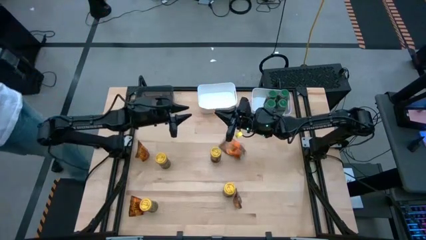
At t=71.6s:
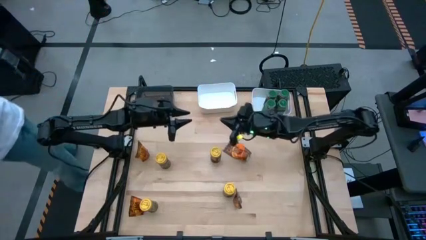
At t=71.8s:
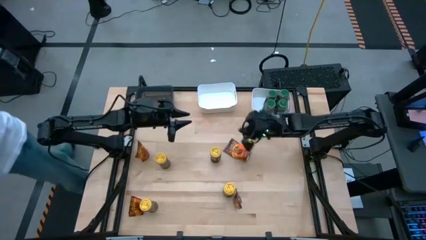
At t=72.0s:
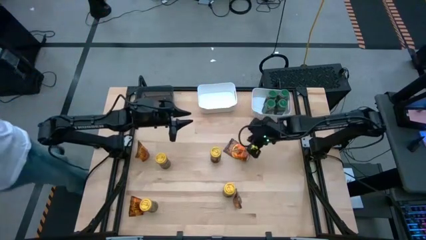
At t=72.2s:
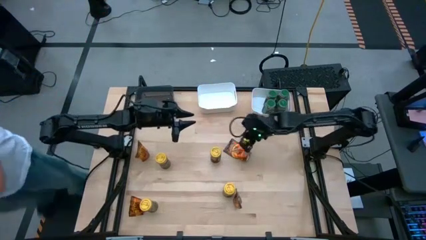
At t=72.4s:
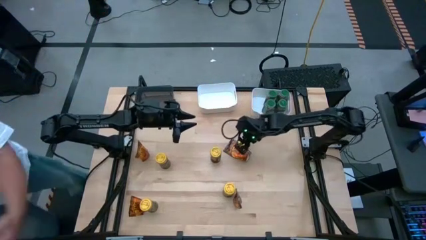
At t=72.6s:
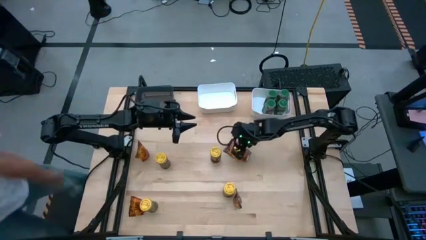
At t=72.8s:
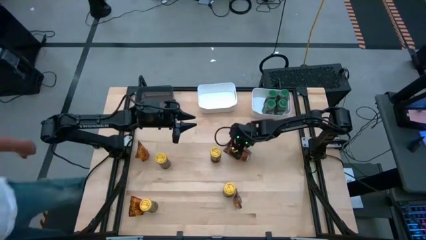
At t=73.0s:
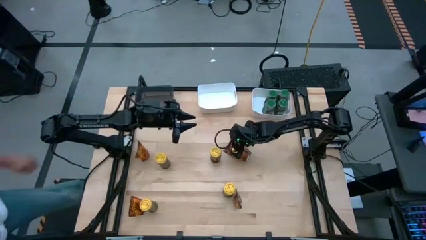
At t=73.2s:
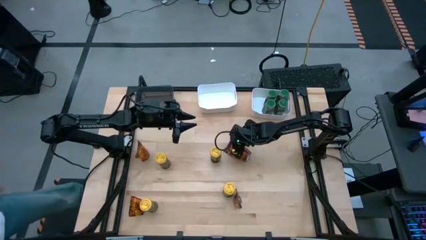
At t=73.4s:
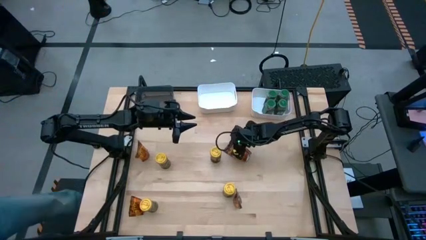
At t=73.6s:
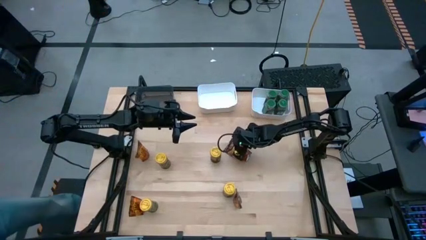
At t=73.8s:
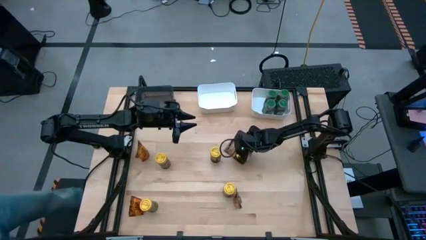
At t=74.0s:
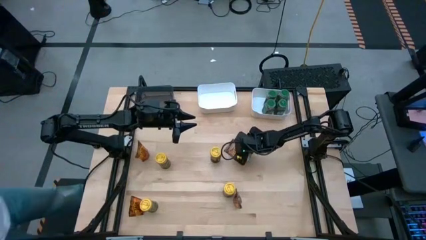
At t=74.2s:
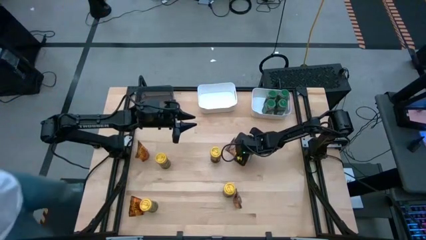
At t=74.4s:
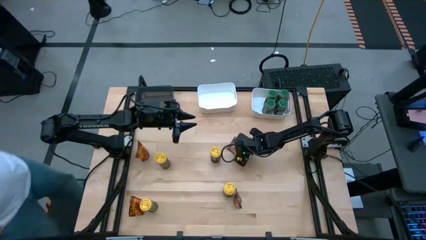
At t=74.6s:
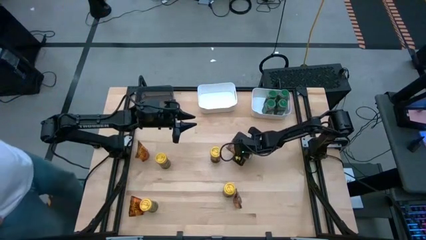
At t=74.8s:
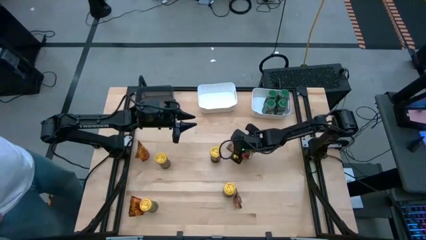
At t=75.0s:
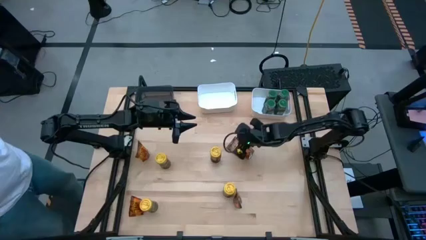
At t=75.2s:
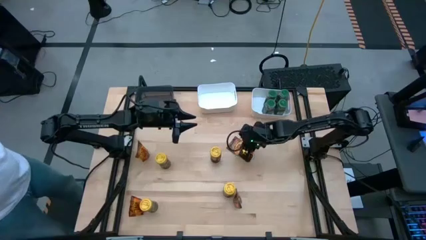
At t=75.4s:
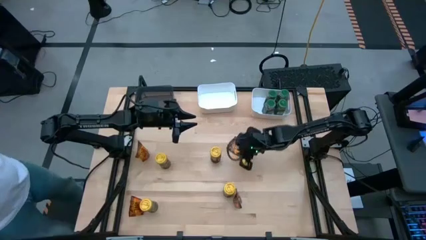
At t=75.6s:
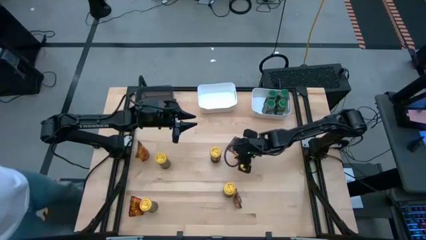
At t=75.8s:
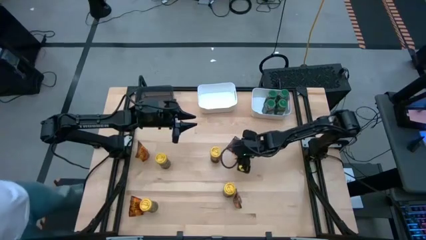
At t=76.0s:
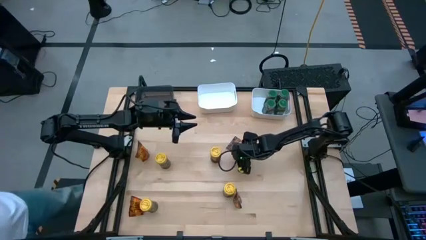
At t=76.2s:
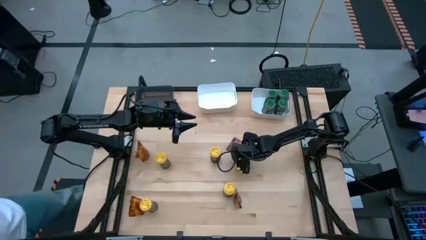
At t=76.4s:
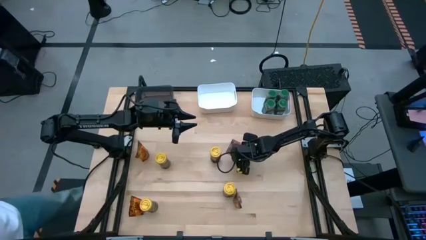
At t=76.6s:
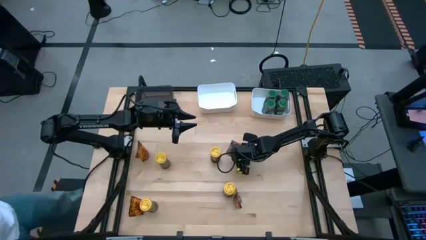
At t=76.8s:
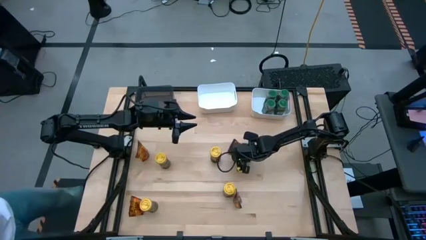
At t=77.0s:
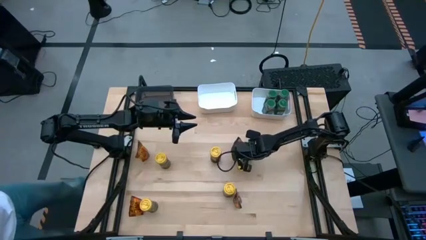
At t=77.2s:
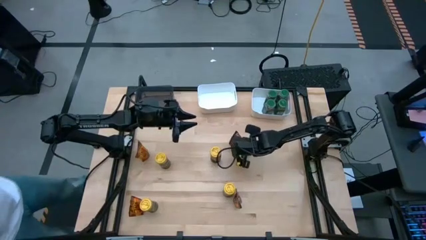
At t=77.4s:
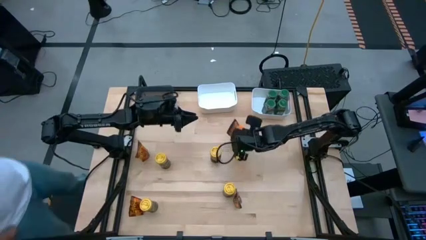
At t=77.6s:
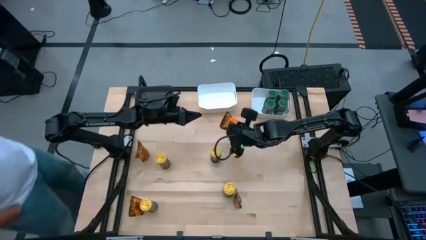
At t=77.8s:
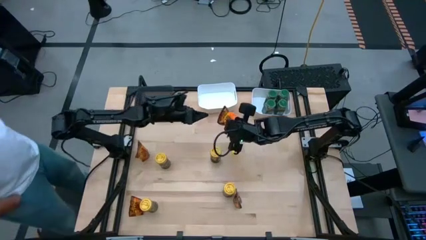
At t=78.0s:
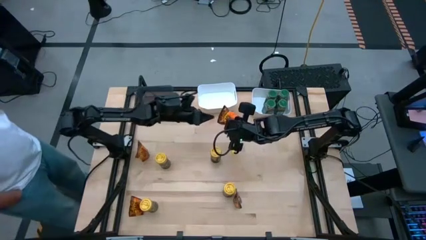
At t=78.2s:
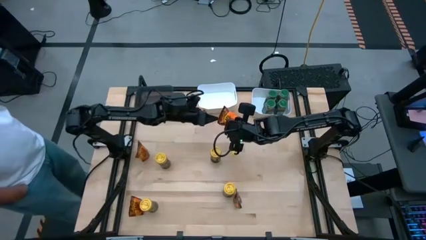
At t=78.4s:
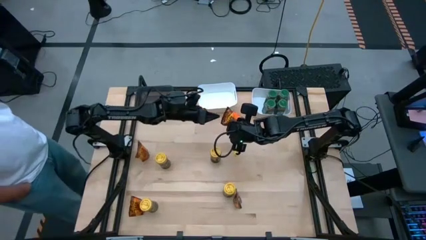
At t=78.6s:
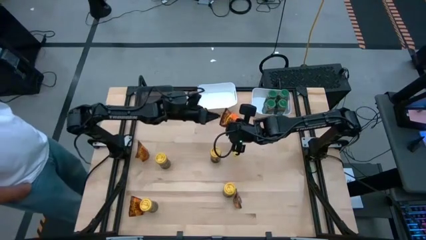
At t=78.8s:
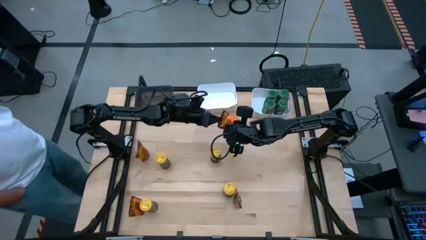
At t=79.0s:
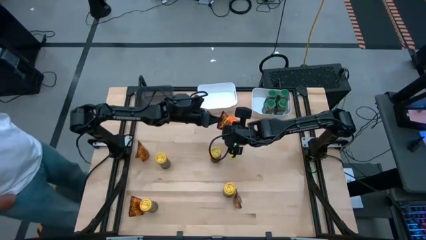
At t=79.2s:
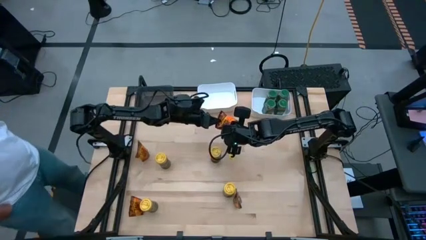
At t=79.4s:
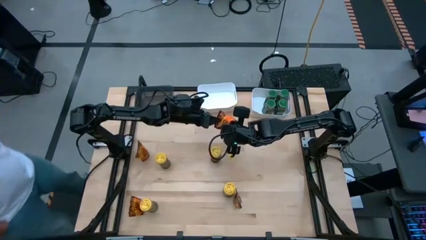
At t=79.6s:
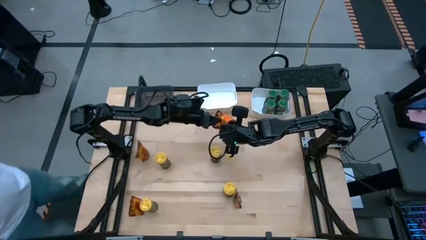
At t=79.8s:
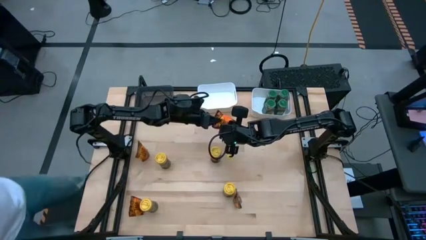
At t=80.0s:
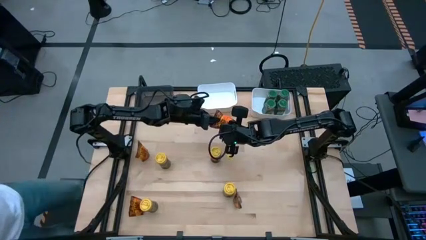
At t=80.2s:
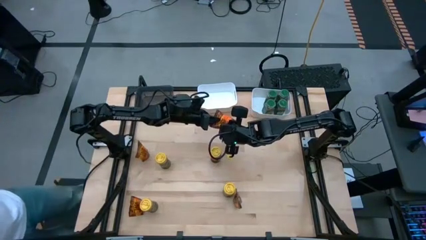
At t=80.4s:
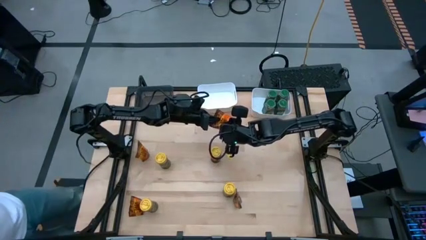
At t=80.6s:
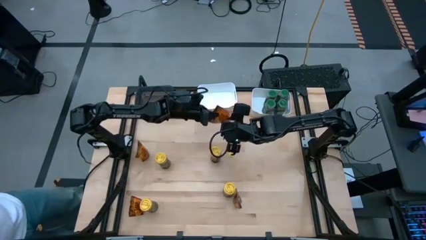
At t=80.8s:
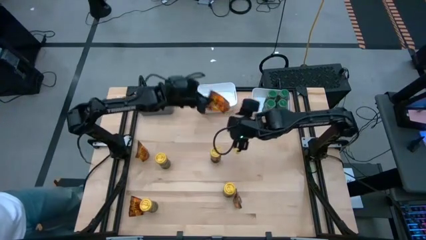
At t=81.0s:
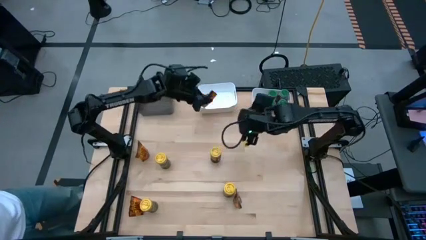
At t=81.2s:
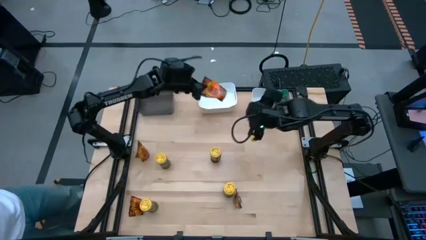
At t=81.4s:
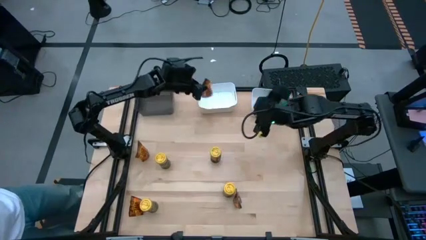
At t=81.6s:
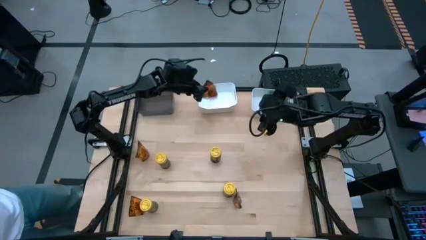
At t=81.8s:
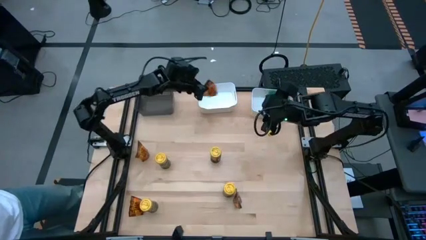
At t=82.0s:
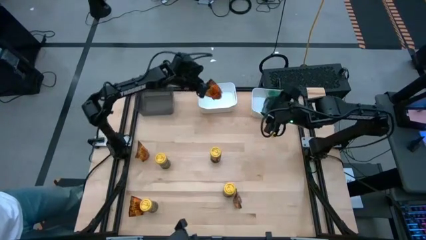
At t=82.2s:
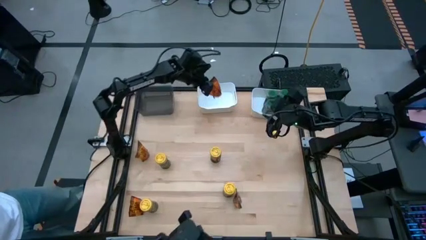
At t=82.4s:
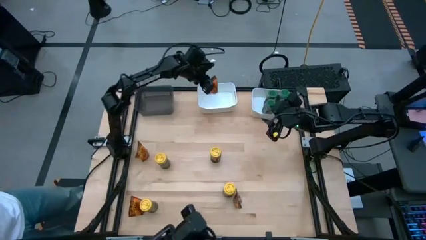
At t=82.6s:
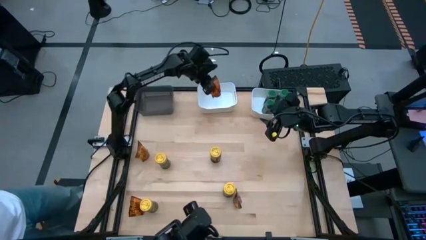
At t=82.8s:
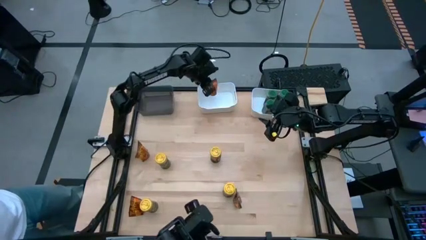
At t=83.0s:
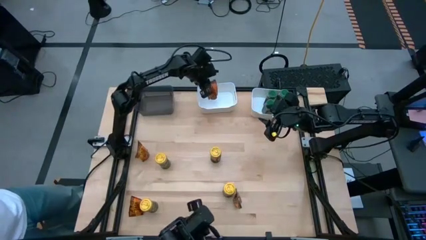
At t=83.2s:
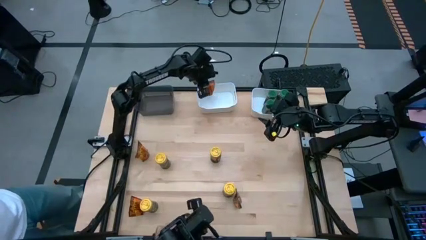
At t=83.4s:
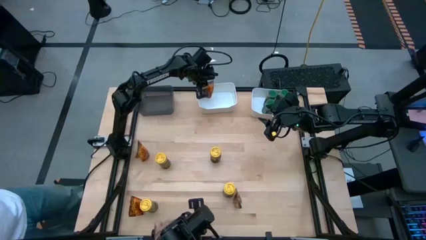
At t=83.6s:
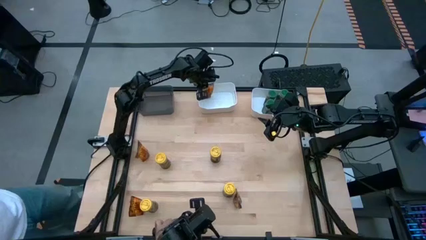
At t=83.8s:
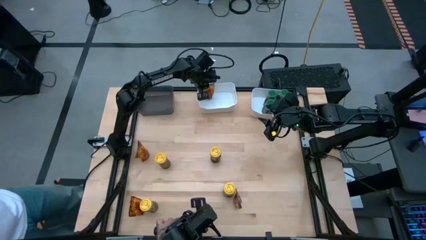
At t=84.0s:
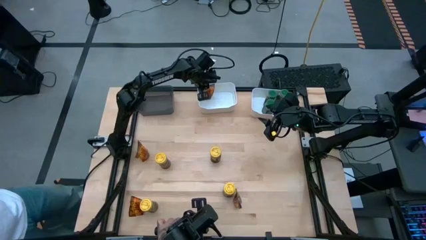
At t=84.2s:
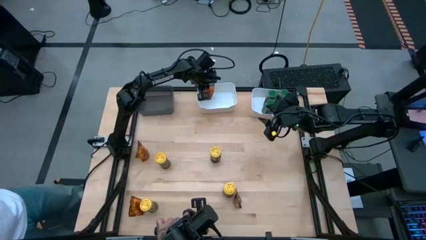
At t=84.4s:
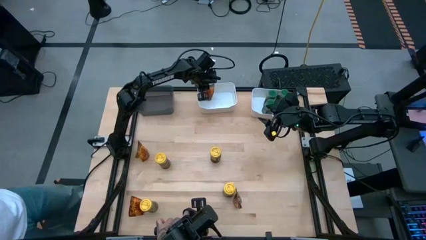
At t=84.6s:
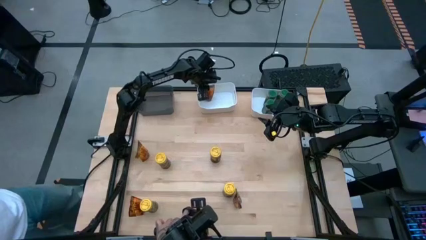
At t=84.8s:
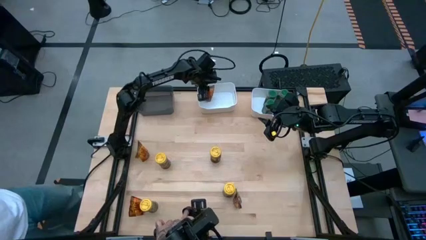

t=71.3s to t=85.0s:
Task: Sort spices by type
Put the top right orange seasoning bag into the left white bin

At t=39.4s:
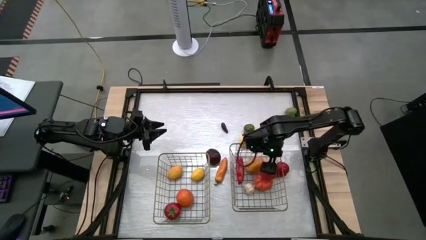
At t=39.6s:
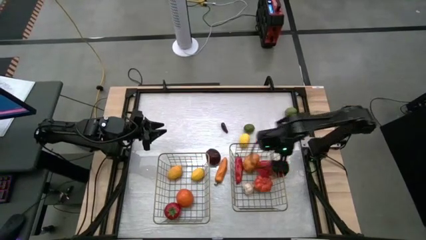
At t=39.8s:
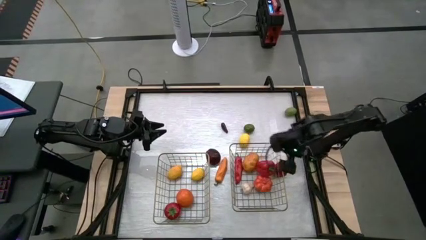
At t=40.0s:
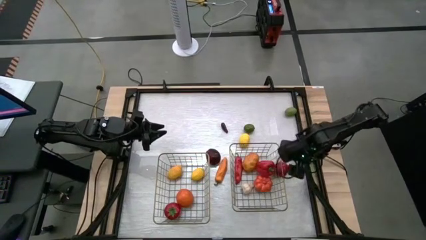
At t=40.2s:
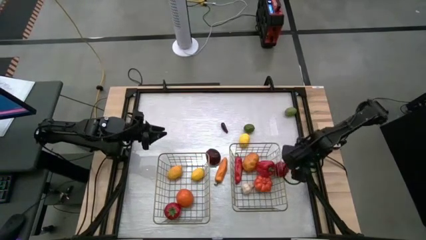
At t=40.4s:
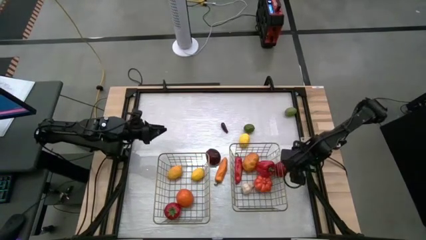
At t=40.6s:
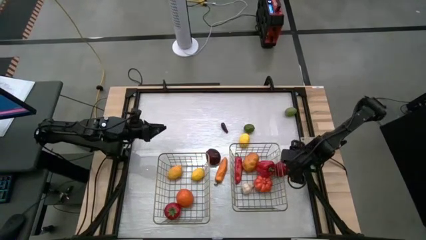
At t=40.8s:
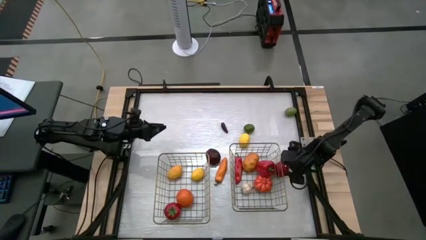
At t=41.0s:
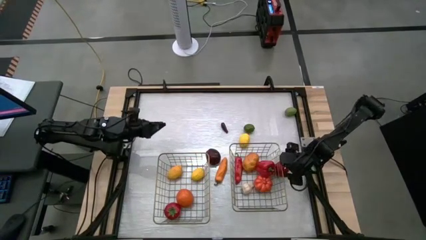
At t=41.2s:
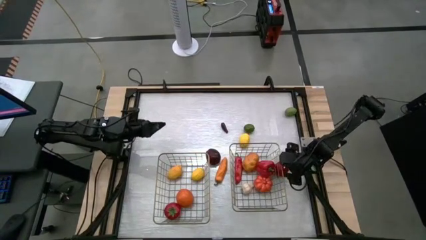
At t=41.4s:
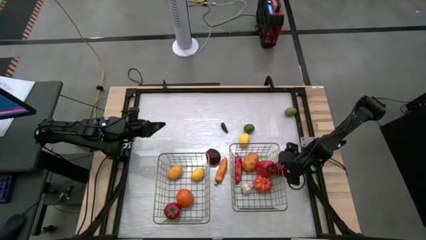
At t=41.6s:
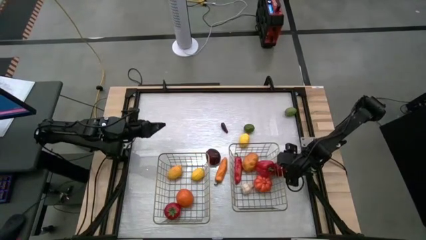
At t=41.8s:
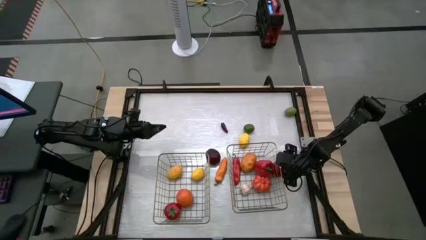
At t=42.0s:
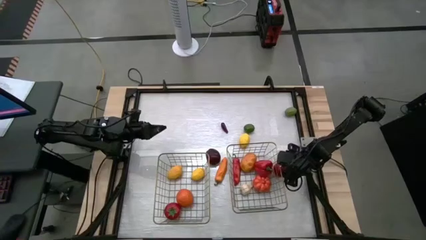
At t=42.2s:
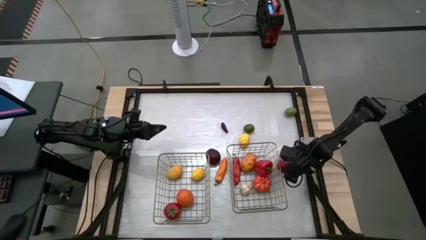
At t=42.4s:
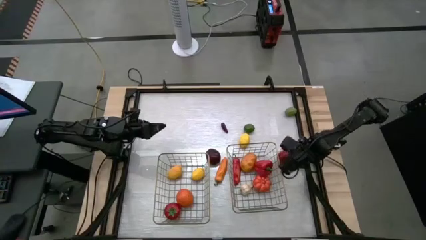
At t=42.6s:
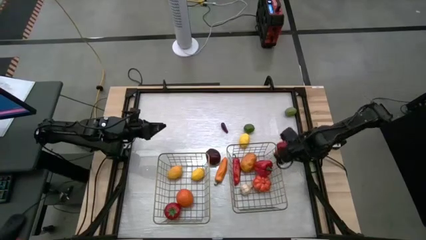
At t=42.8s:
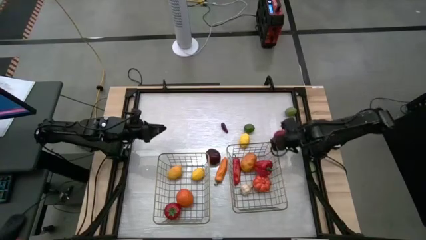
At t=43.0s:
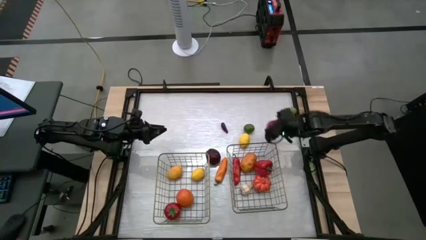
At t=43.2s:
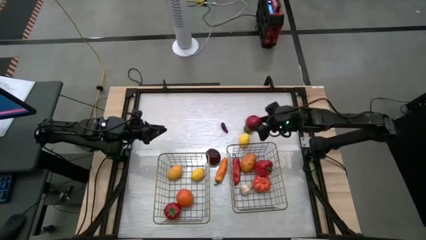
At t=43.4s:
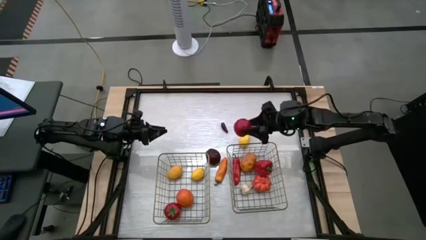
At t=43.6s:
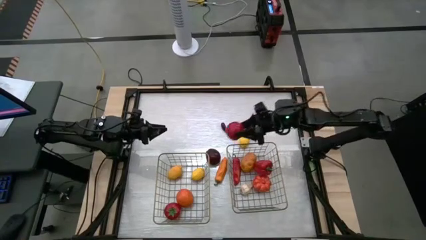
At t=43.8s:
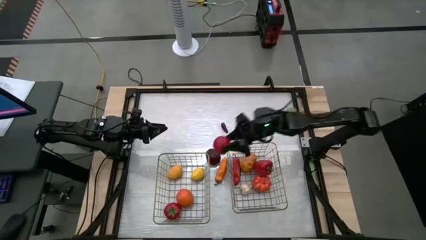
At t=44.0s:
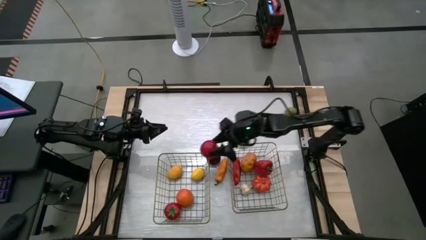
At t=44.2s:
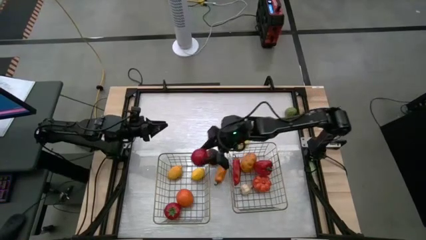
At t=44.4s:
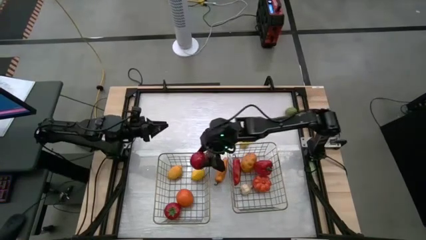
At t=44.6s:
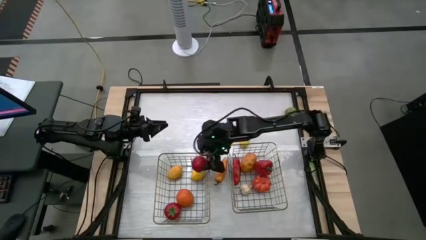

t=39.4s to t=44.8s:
Task: Sort produce into baskets
Put the tomato into the left brown wire basket
